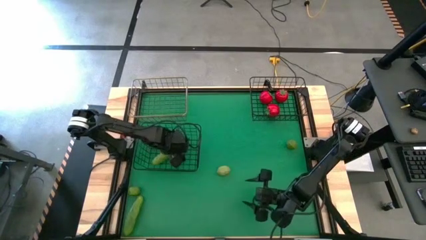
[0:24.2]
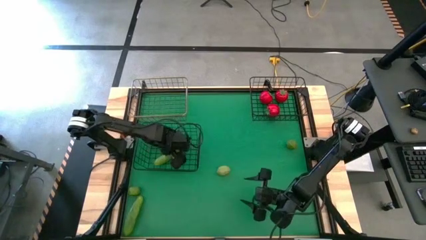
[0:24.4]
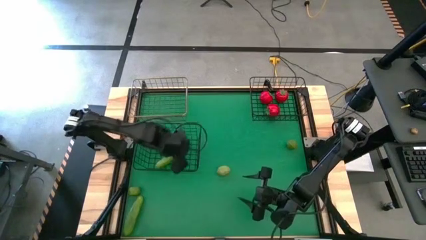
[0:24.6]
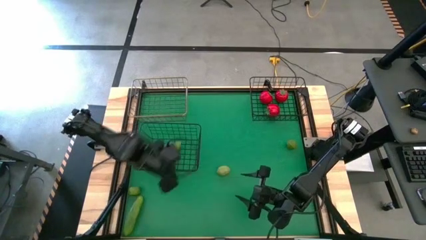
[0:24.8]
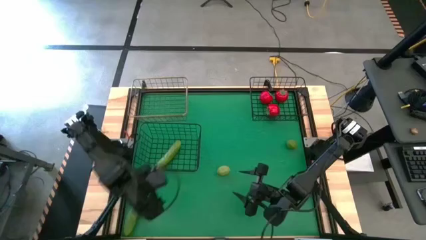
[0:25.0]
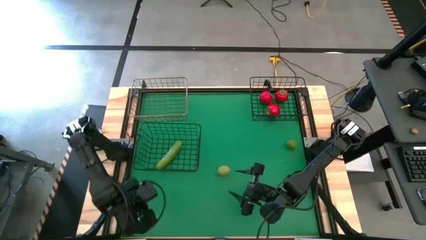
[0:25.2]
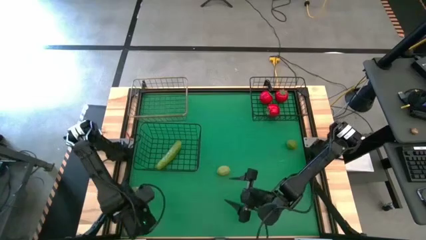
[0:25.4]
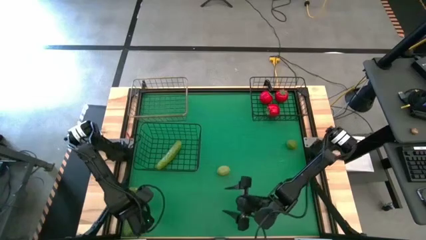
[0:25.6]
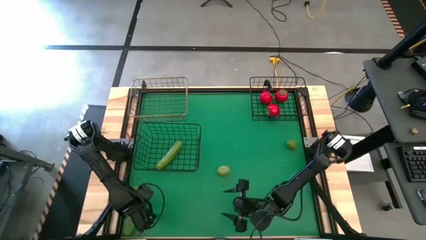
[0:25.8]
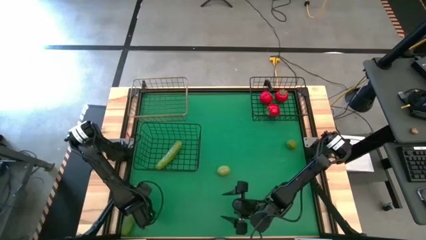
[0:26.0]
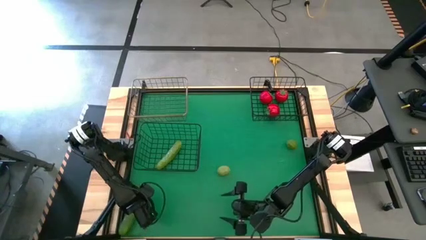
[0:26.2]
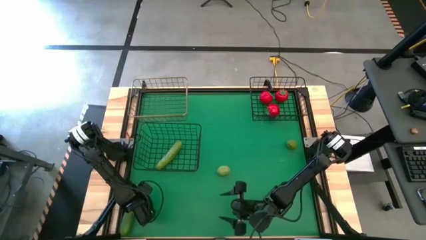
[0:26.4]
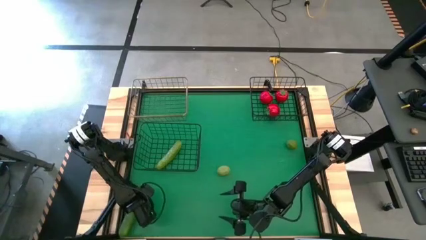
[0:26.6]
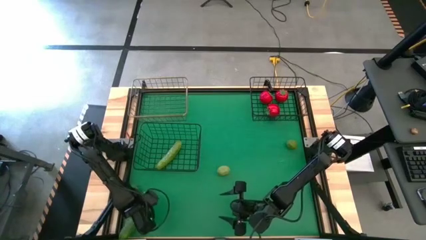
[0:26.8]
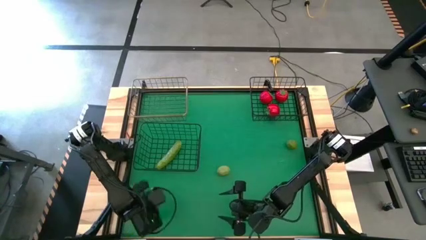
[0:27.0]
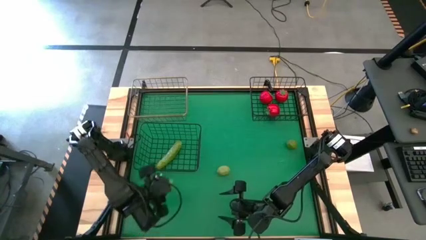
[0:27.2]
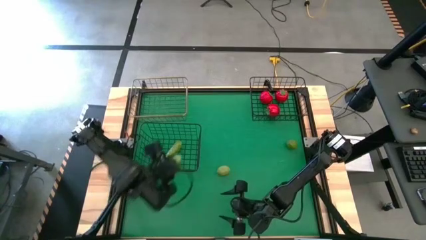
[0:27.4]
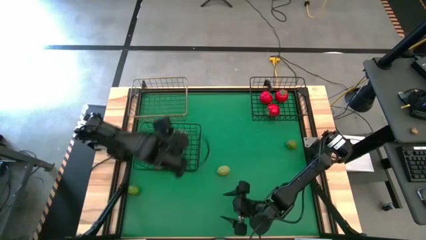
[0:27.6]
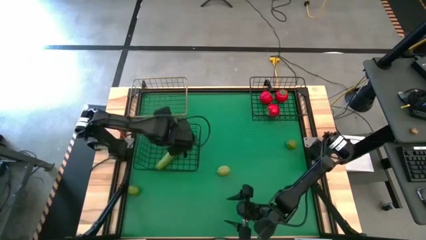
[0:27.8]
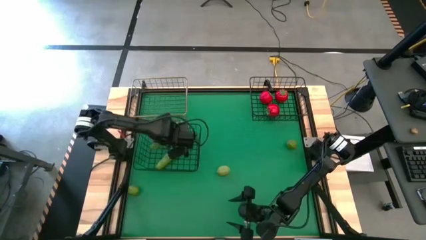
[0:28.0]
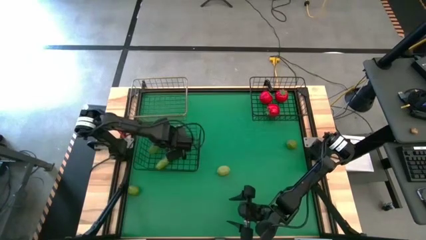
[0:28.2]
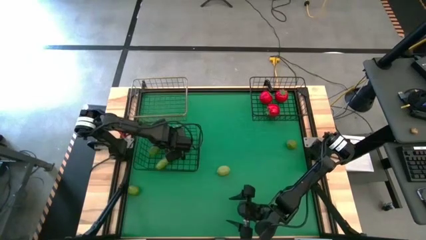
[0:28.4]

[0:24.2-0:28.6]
Task: Sort produce into baskets
Put the cucumber into the left black metal wire basket

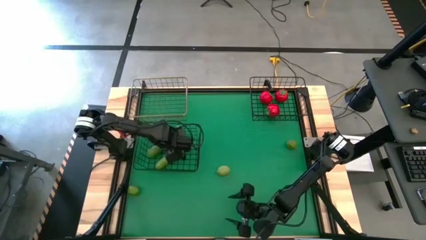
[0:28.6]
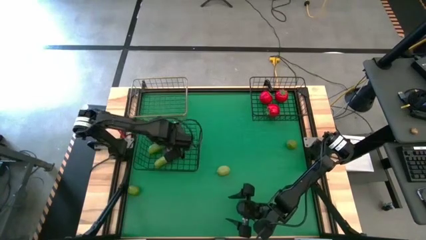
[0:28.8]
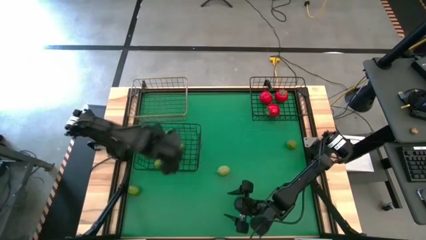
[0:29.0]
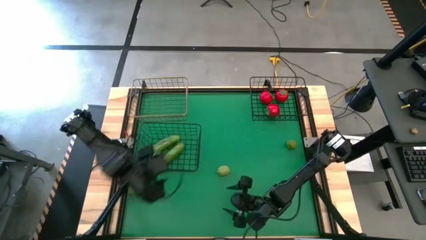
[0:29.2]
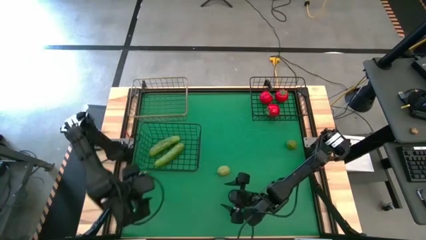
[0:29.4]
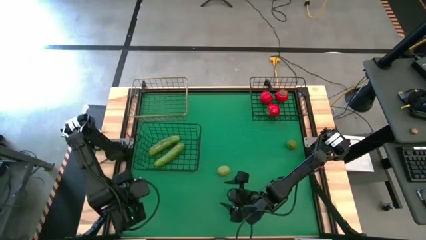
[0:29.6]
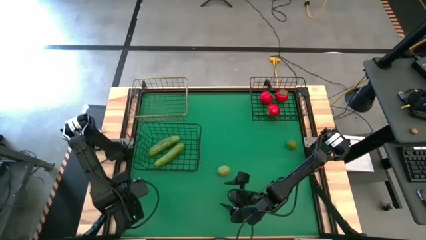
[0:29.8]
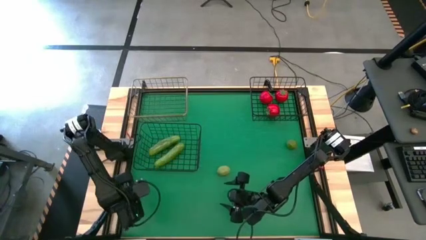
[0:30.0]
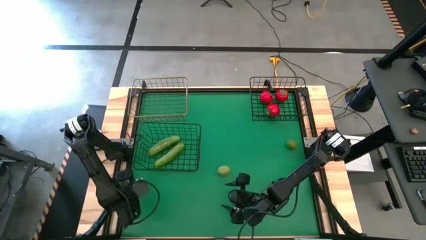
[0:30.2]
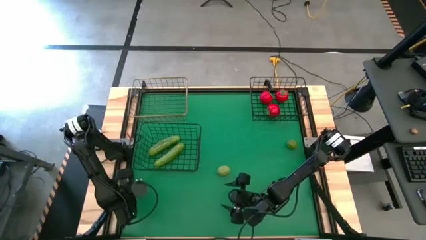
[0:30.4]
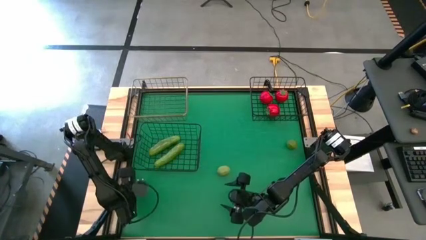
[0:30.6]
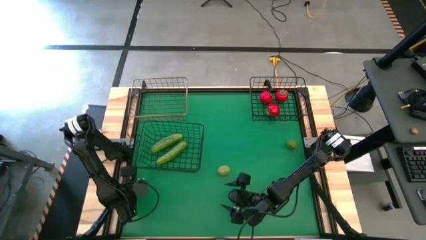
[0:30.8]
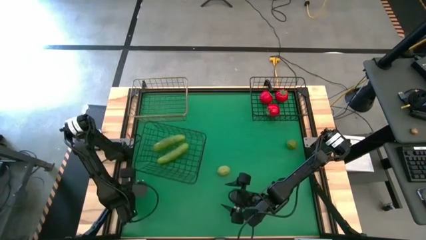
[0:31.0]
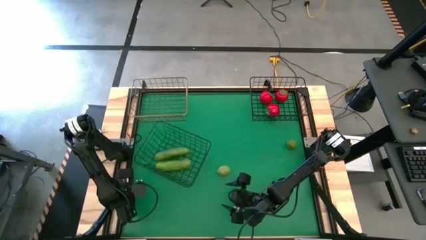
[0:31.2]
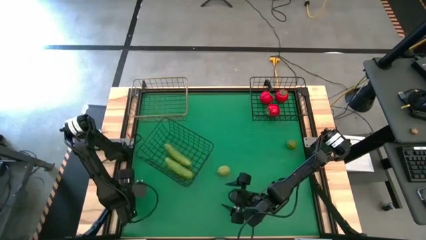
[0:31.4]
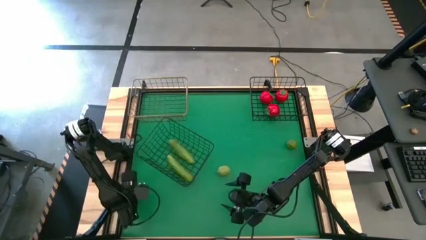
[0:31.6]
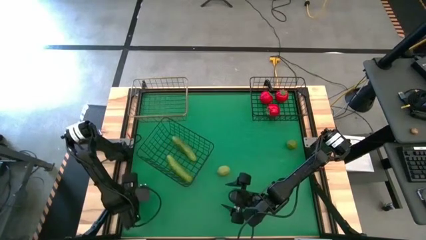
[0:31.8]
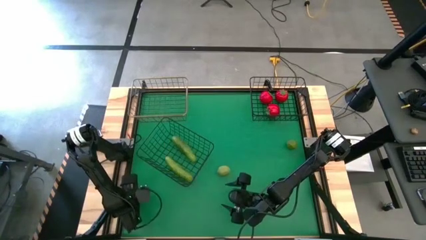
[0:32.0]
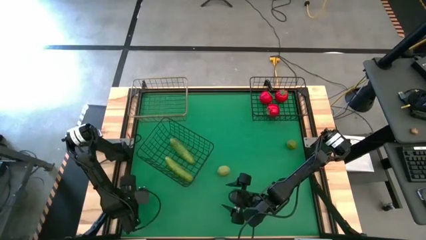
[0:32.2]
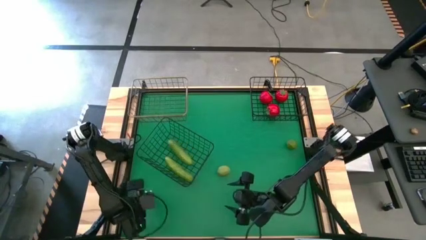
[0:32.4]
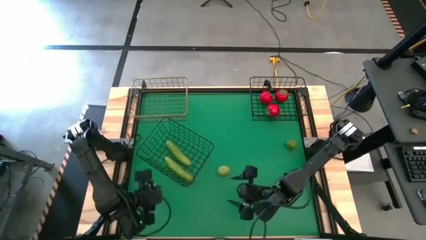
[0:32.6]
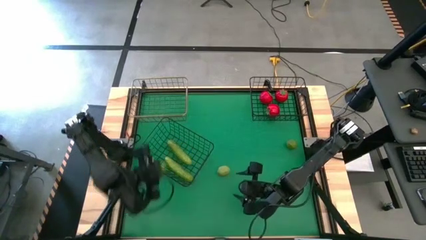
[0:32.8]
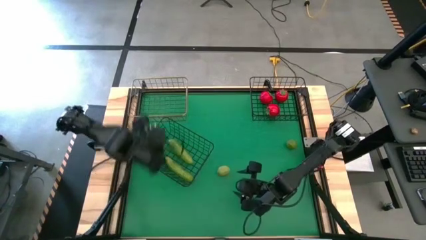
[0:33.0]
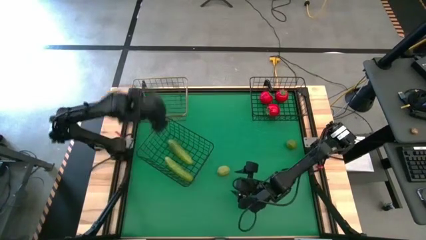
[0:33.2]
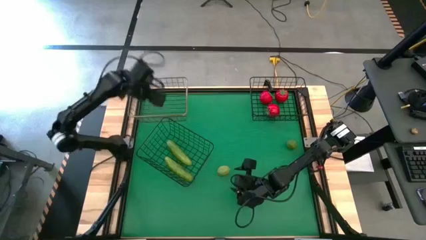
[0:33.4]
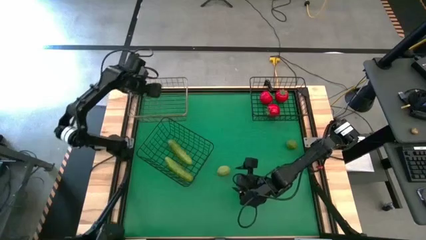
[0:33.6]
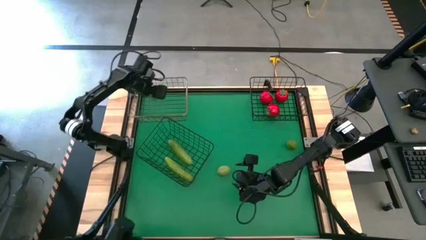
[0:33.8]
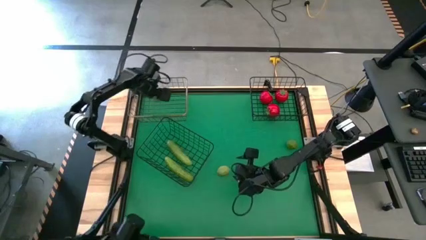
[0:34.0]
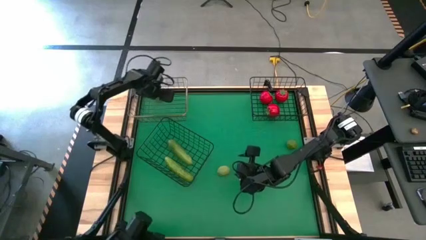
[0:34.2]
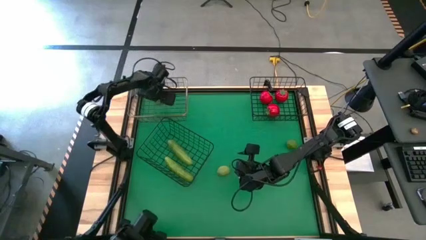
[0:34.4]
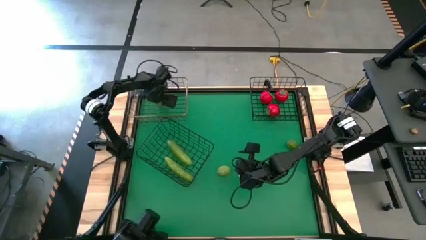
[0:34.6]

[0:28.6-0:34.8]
Put the left lime into the gold metal wire basket

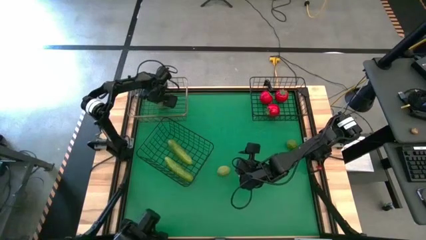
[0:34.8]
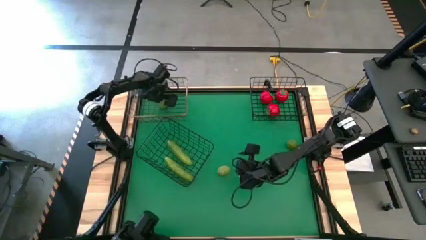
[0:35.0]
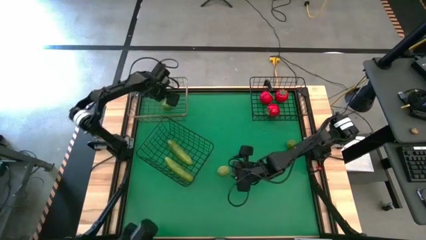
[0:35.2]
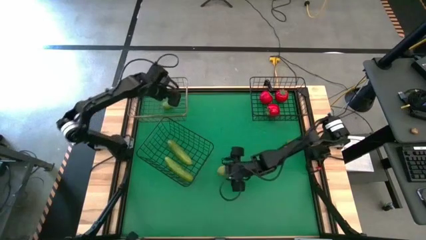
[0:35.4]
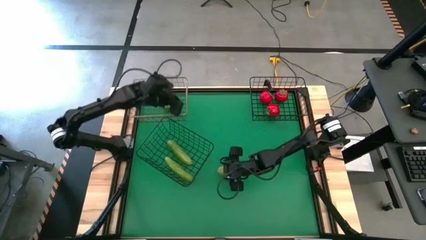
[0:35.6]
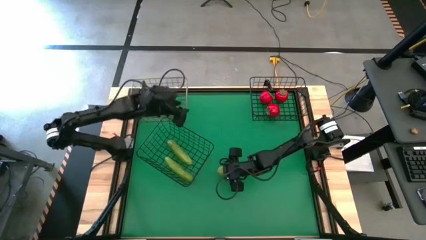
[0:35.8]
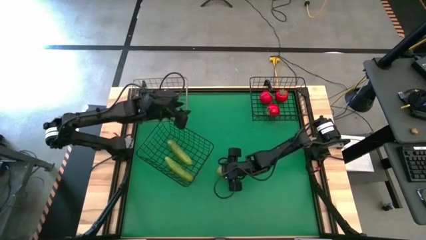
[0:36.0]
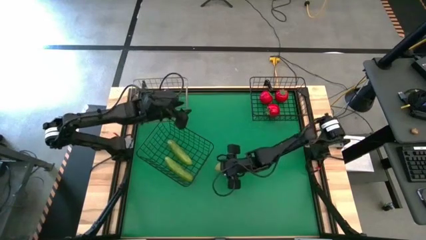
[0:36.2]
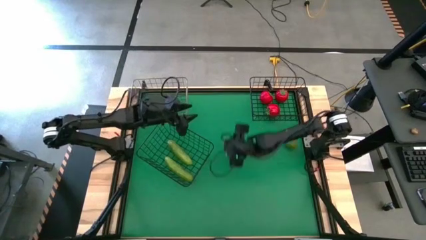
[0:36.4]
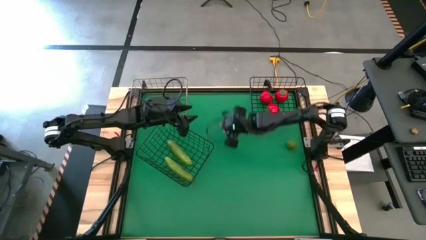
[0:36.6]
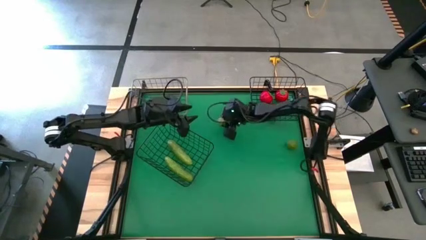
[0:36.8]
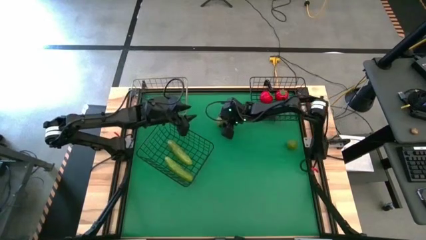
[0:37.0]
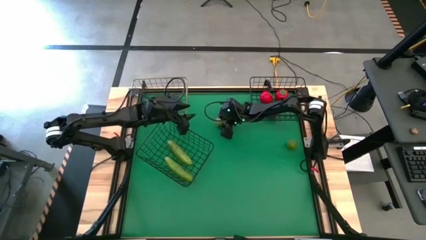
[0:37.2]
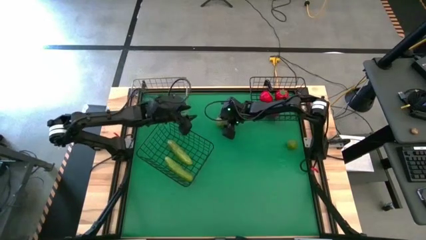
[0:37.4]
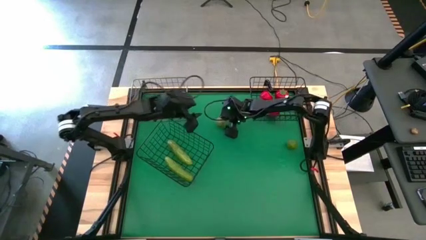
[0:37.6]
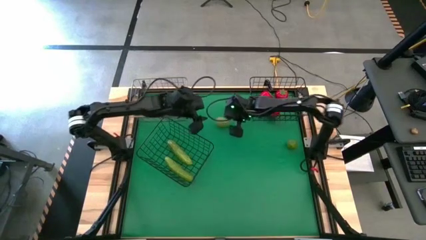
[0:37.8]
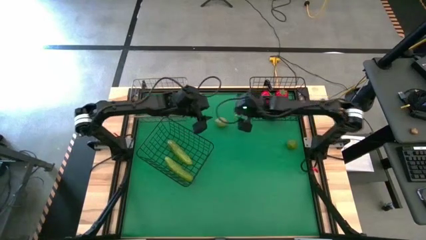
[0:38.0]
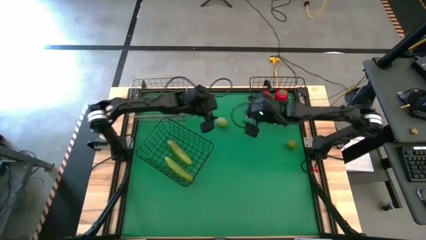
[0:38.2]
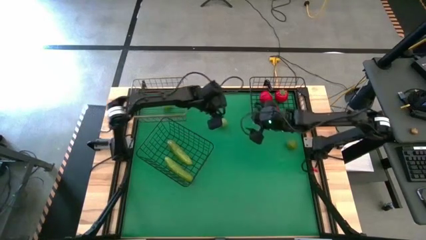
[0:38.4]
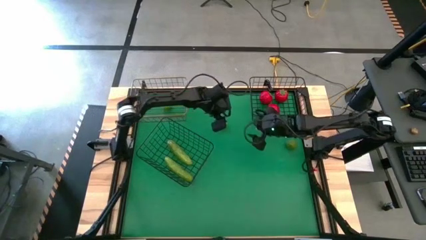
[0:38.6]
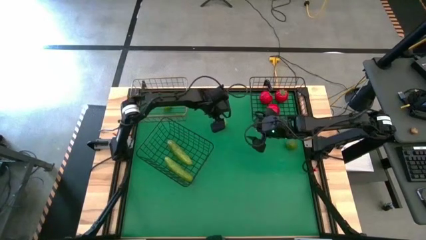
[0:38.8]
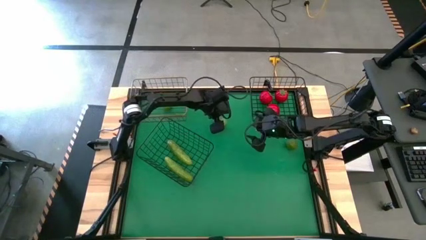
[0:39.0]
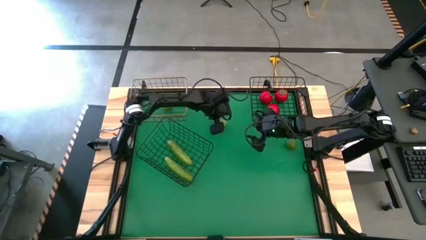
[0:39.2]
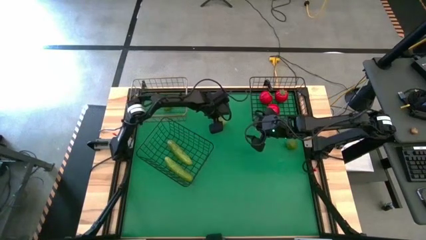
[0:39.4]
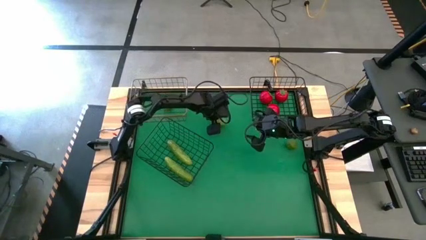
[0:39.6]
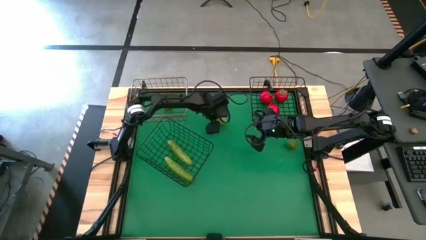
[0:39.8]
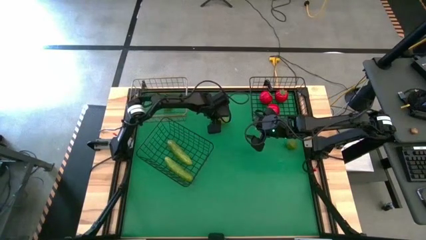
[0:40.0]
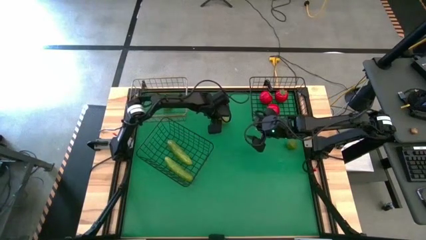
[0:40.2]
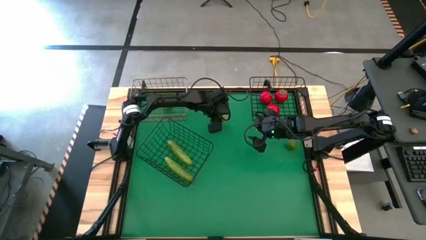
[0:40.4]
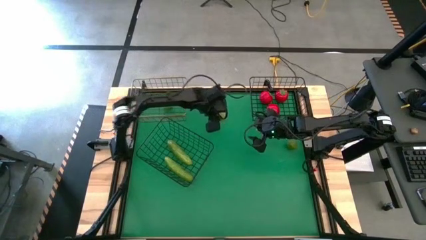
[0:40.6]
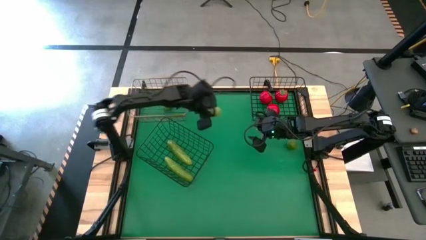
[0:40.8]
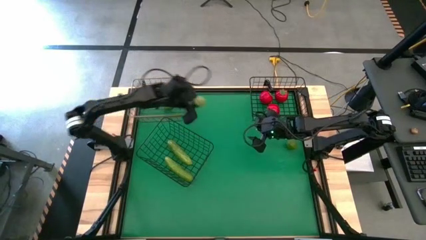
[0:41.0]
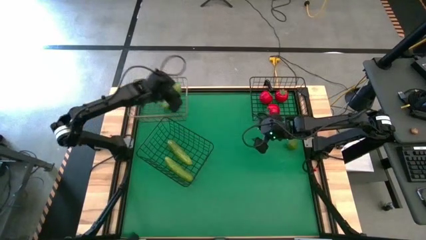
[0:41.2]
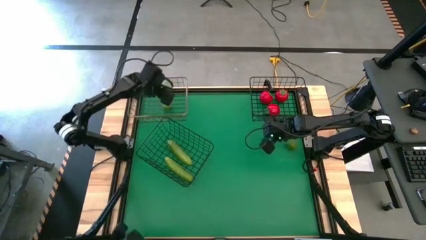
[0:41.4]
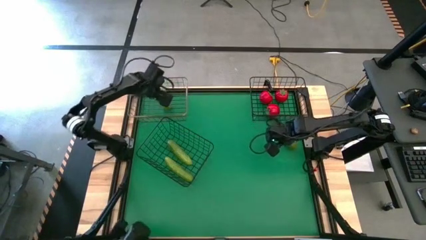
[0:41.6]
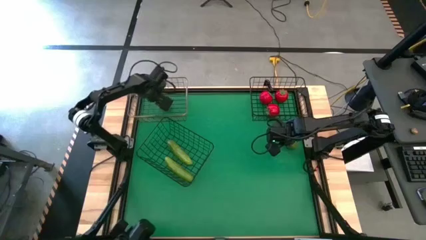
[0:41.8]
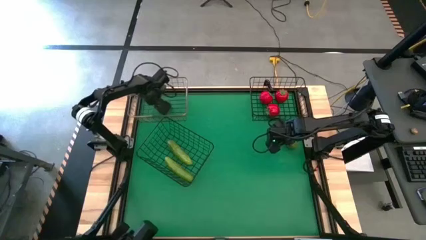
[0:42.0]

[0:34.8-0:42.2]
Put the left lime into the gold metal wire basket
